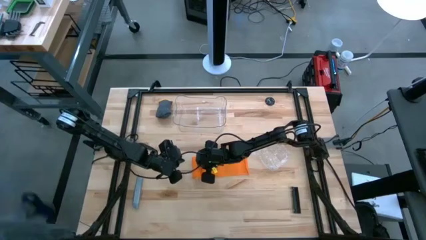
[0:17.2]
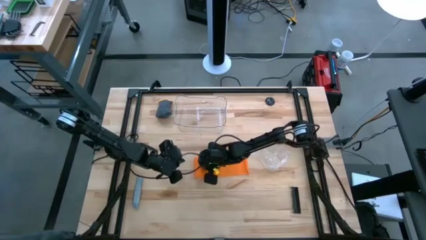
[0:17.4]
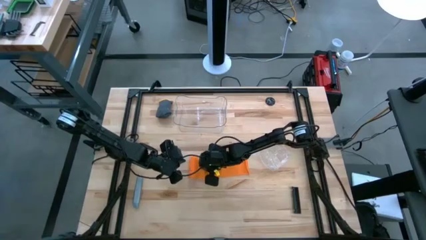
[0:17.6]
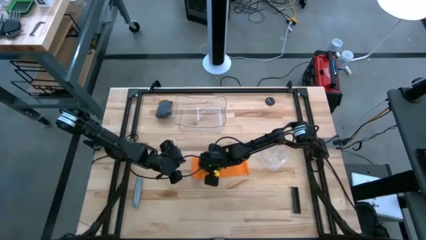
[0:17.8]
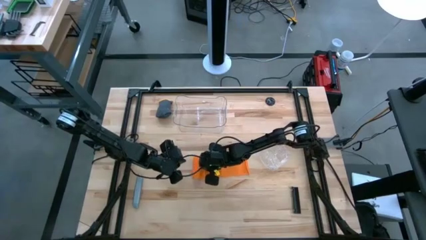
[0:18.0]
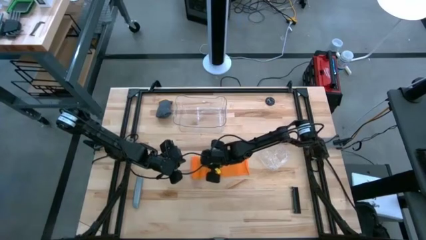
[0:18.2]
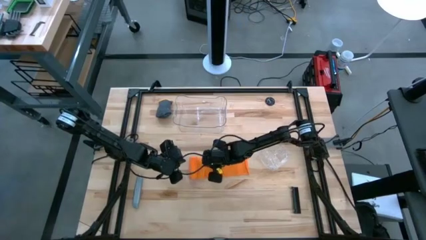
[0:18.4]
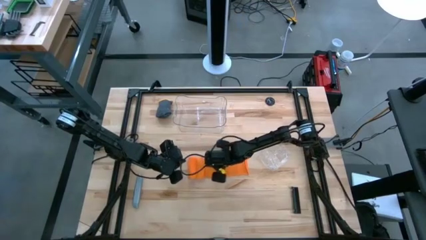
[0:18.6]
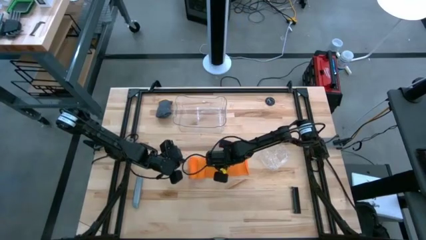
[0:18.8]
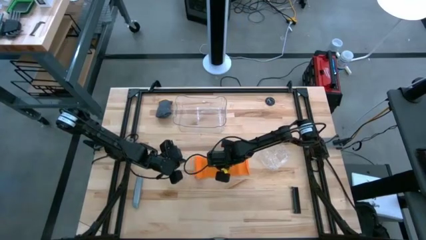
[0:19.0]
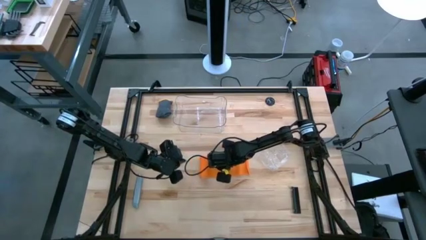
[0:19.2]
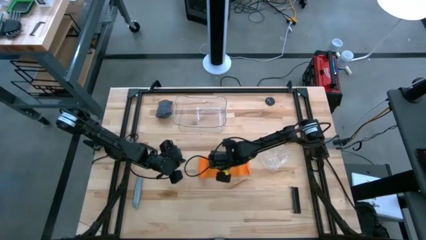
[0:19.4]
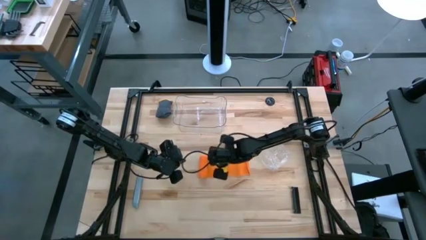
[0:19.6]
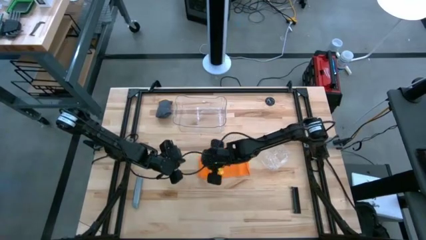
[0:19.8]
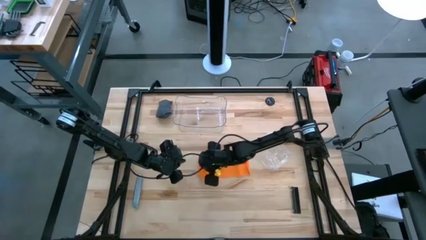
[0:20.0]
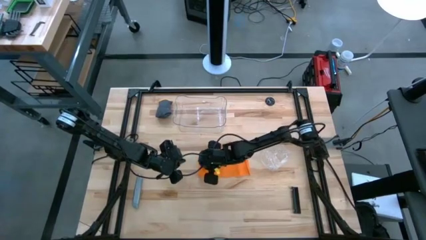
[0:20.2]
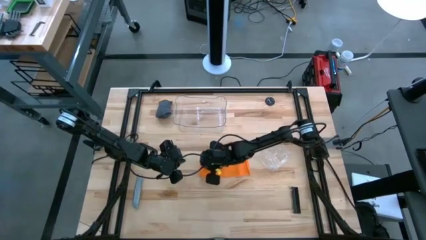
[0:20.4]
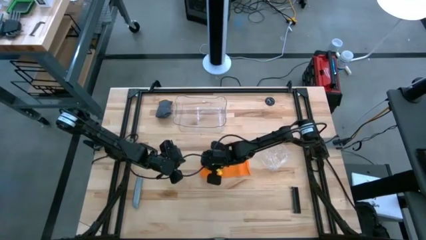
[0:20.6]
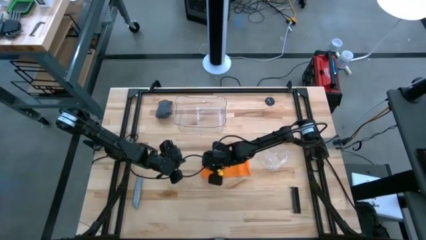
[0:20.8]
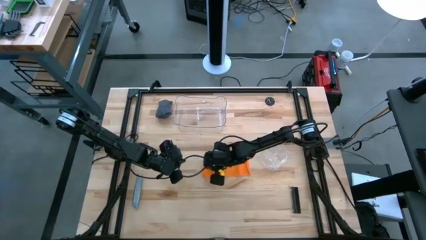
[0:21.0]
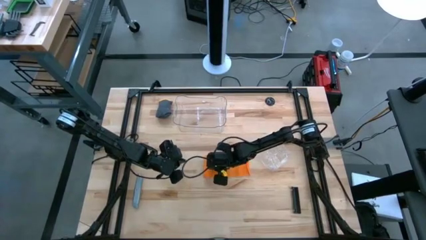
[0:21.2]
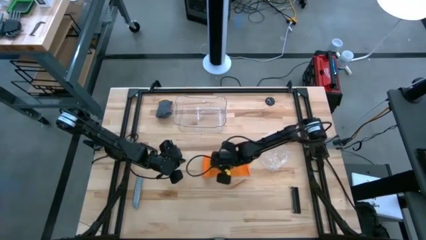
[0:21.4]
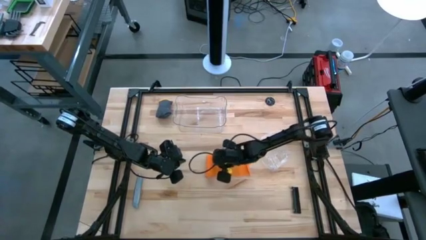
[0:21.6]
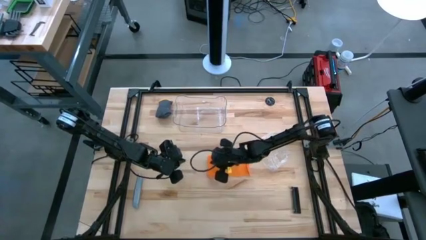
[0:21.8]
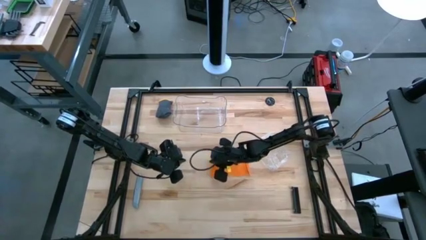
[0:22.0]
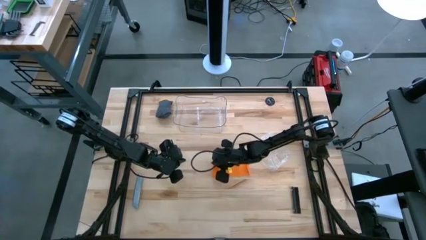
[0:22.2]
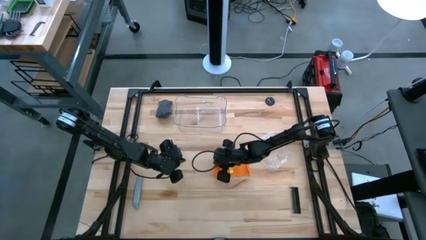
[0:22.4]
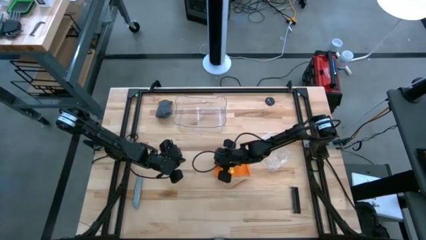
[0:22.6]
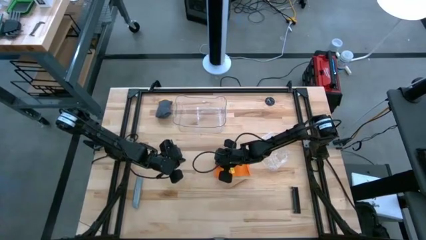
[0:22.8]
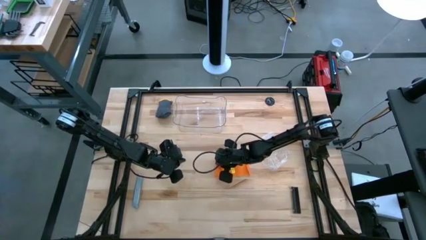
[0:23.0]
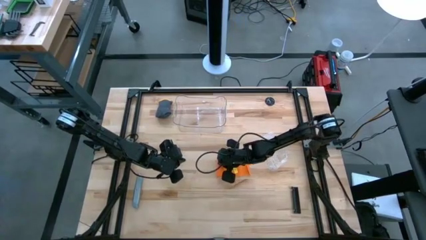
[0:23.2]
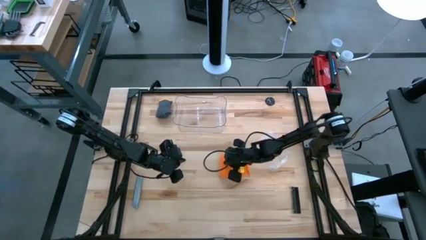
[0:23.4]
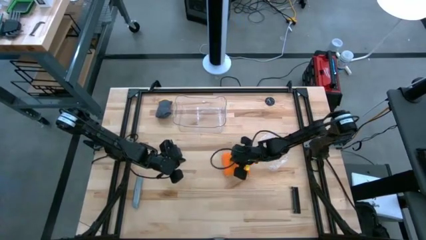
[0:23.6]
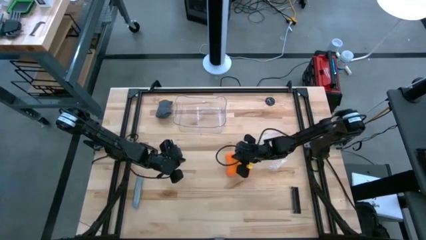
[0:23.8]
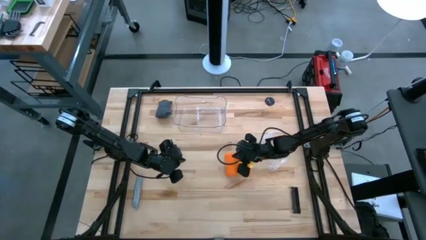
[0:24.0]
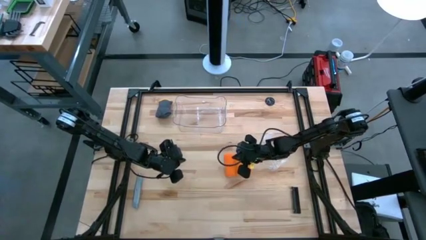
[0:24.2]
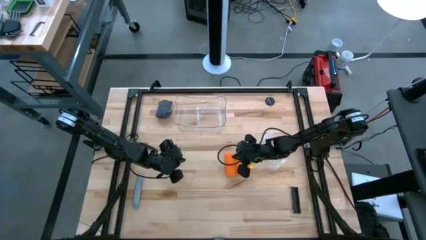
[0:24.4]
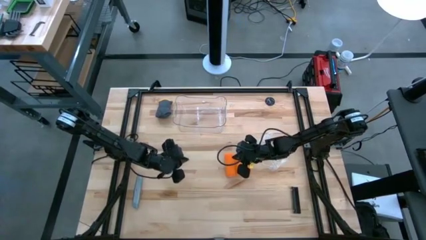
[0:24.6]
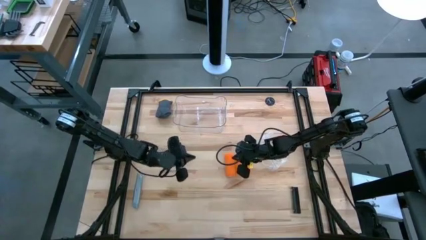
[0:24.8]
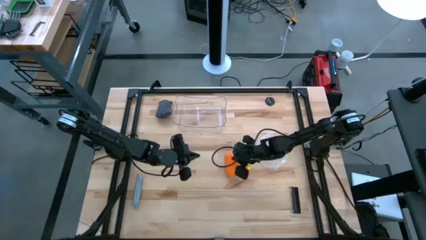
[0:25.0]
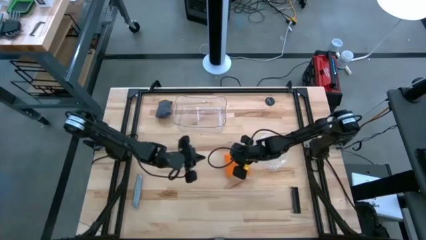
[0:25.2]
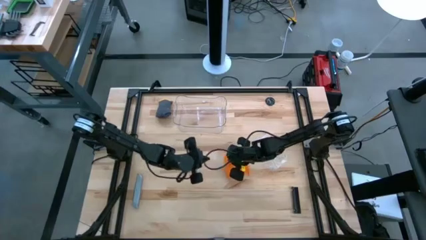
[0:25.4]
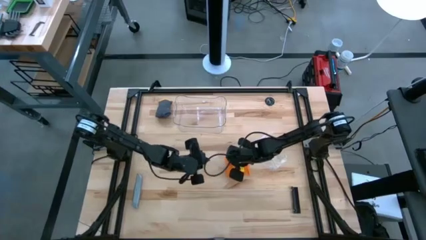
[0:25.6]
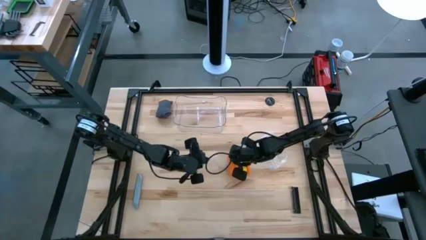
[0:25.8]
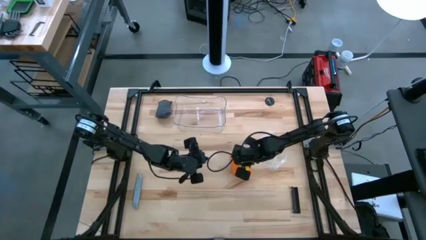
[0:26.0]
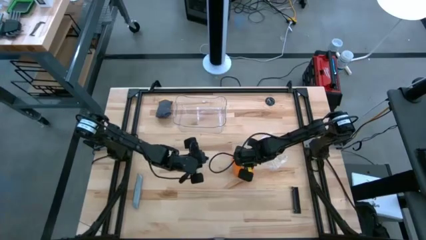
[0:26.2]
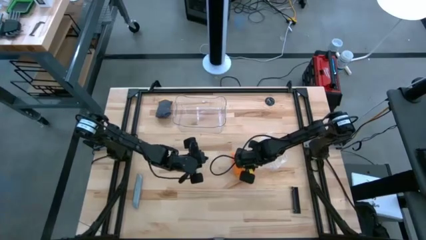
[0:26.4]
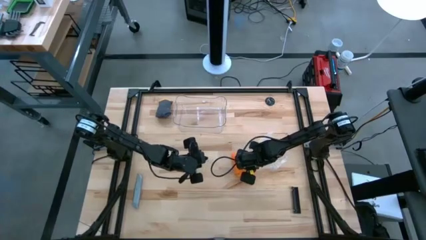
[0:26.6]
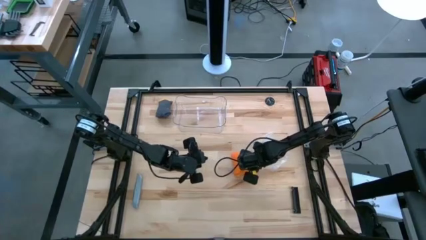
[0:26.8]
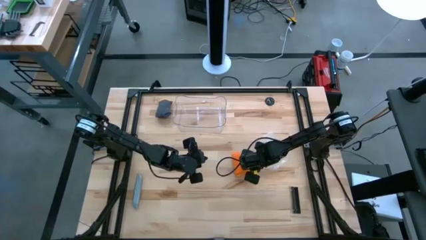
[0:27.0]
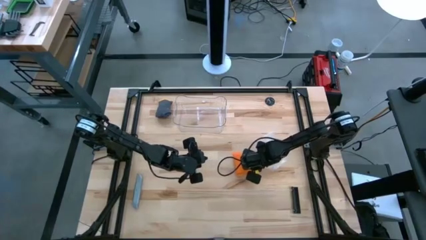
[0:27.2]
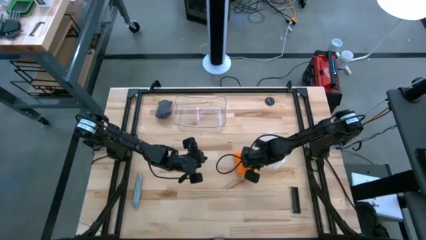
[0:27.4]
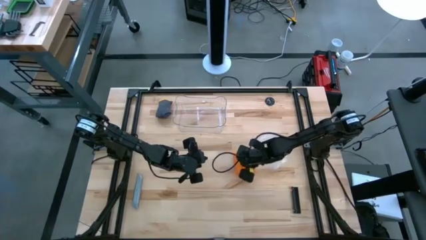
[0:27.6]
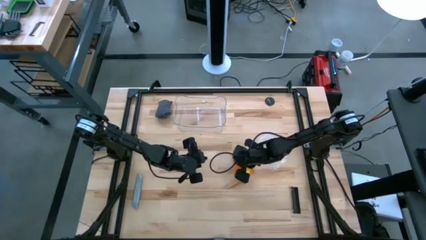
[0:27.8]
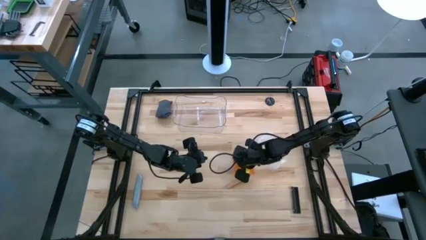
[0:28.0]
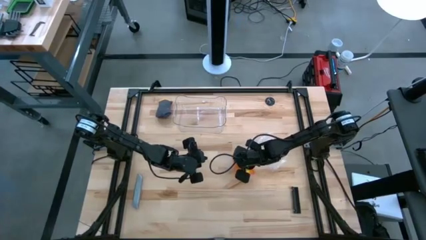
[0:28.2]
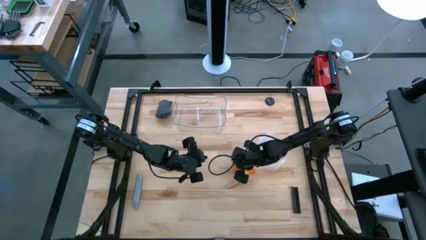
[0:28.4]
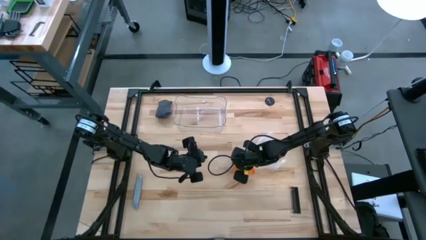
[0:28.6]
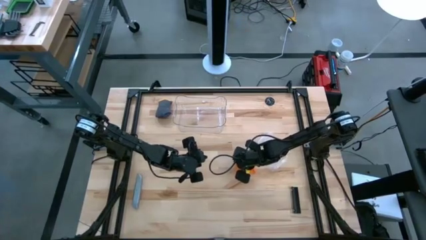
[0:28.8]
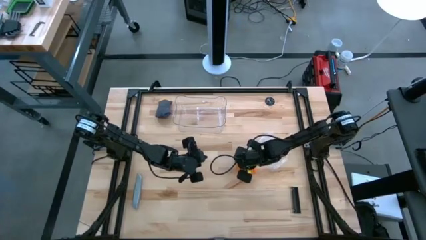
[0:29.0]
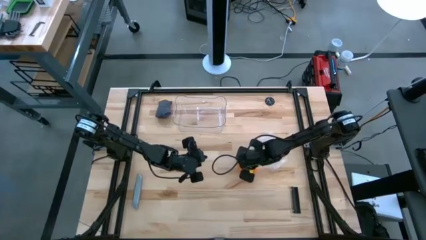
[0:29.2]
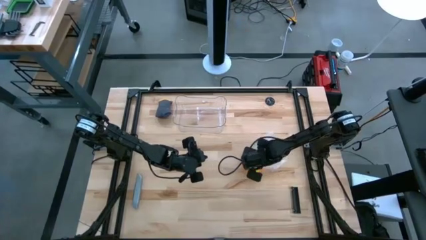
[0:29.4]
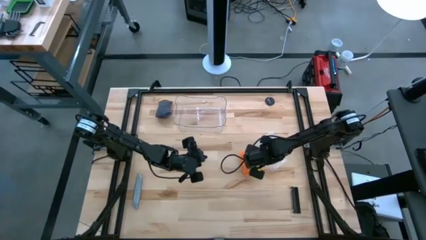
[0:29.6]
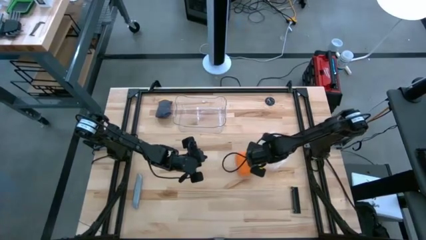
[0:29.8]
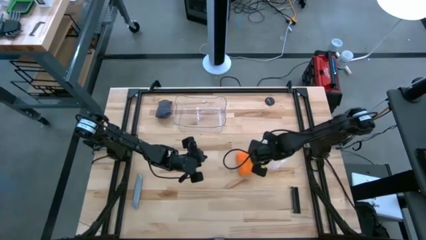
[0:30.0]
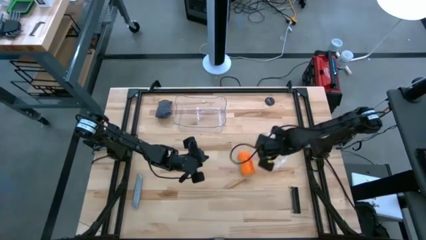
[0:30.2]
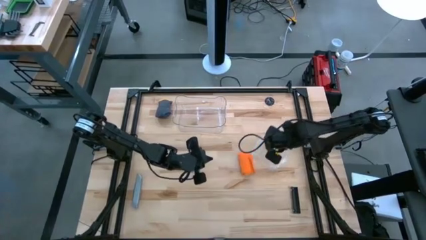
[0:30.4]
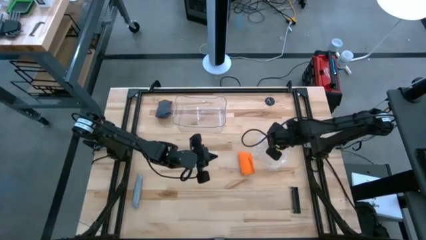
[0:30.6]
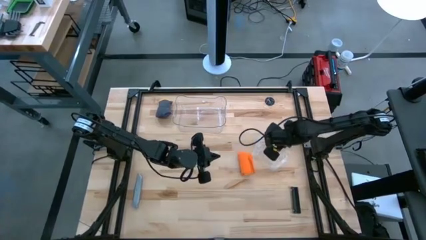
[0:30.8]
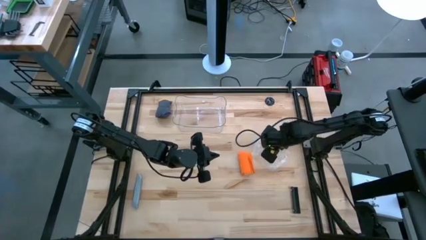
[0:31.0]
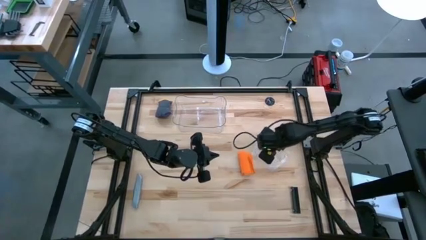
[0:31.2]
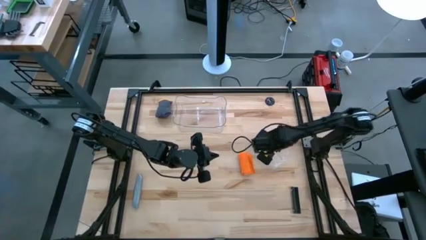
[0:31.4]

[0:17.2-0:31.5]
Task: Roll bandage
Roll the orange bandage
